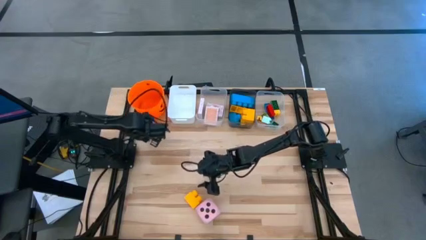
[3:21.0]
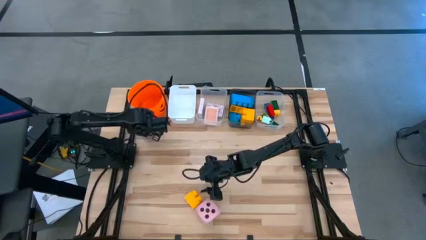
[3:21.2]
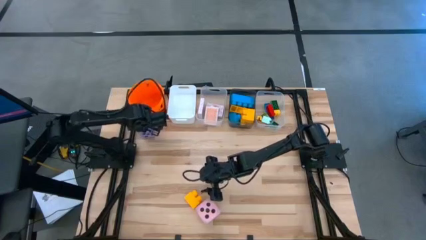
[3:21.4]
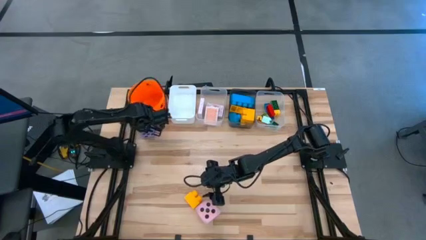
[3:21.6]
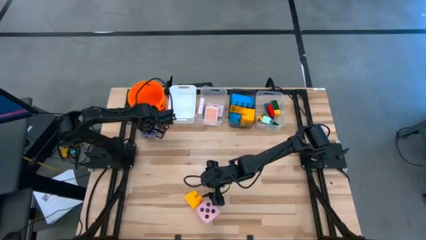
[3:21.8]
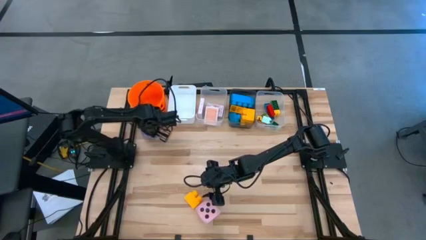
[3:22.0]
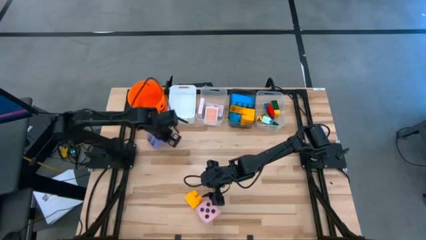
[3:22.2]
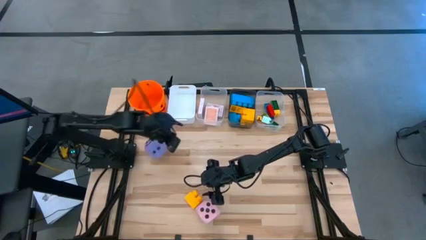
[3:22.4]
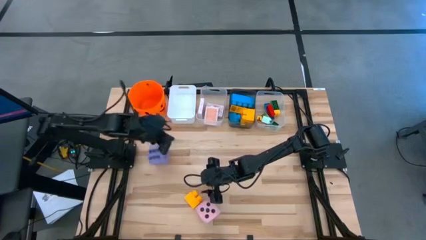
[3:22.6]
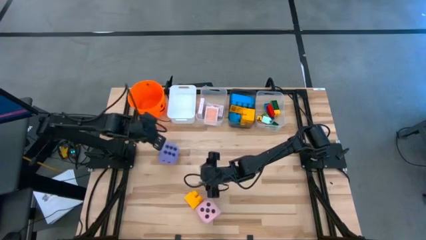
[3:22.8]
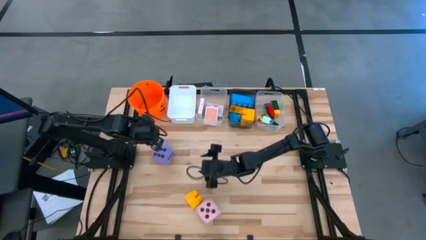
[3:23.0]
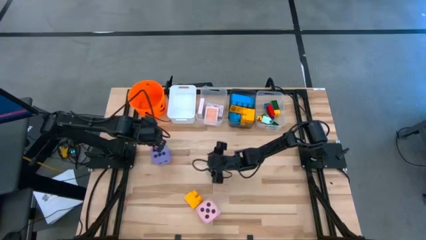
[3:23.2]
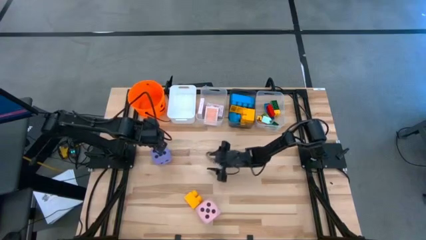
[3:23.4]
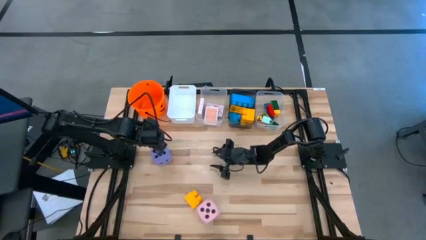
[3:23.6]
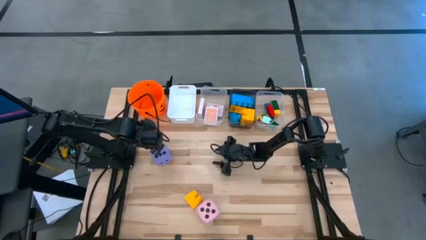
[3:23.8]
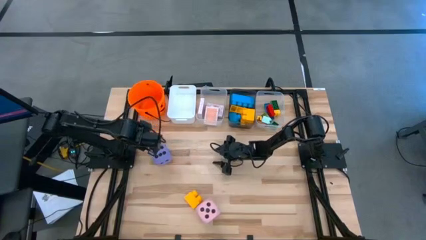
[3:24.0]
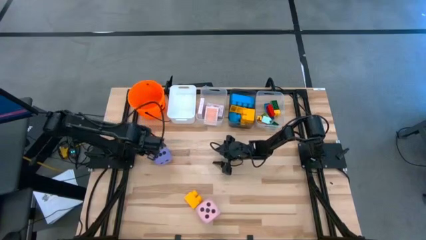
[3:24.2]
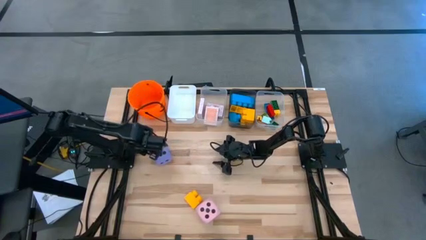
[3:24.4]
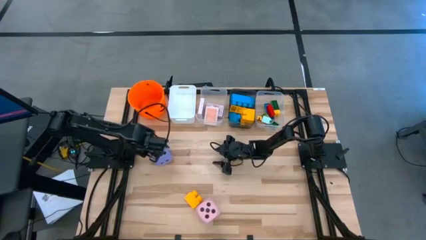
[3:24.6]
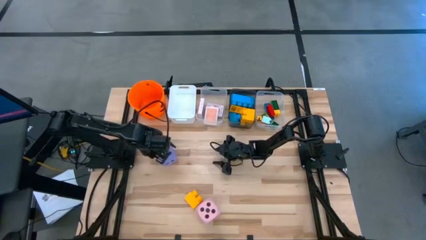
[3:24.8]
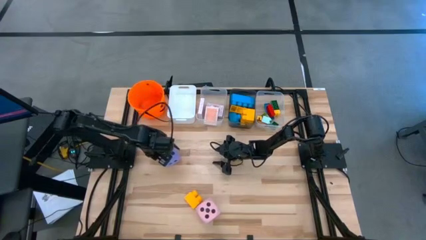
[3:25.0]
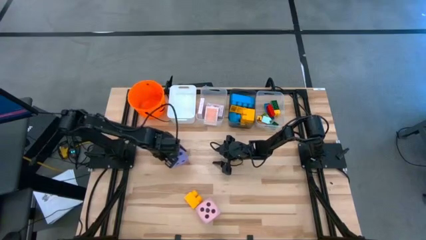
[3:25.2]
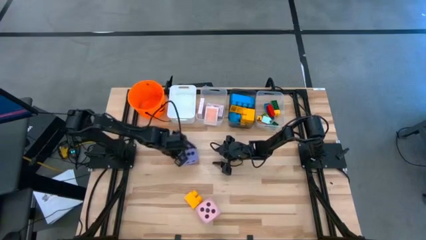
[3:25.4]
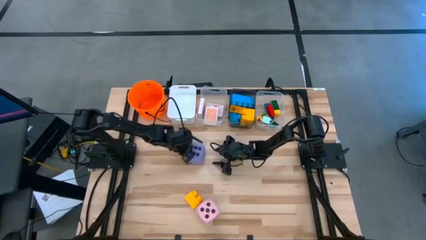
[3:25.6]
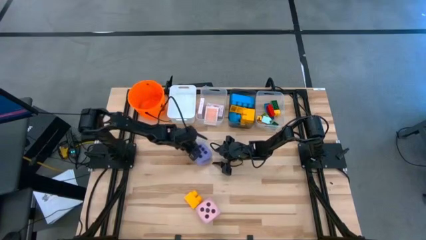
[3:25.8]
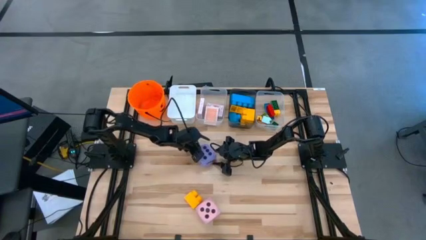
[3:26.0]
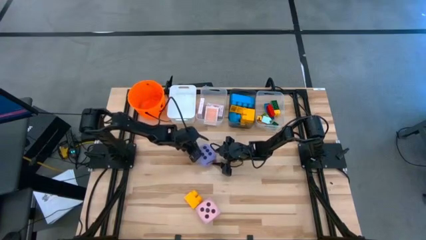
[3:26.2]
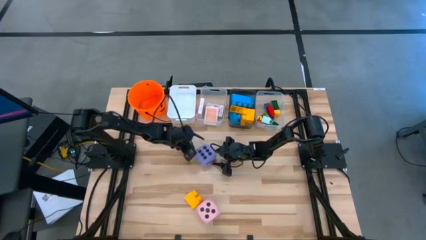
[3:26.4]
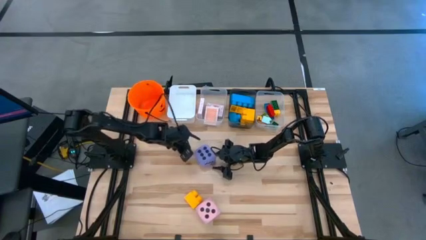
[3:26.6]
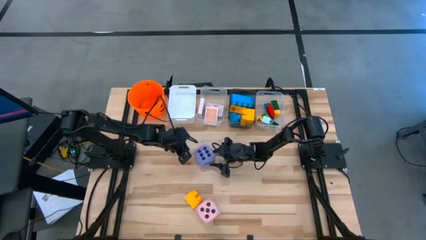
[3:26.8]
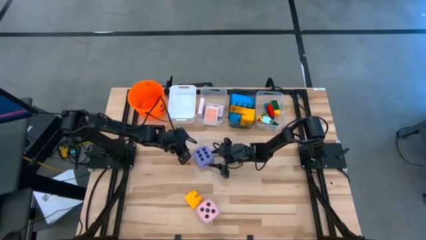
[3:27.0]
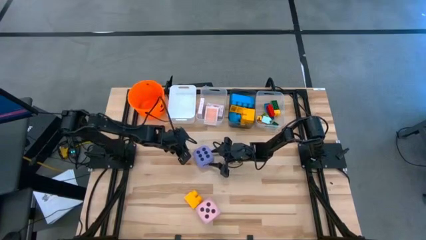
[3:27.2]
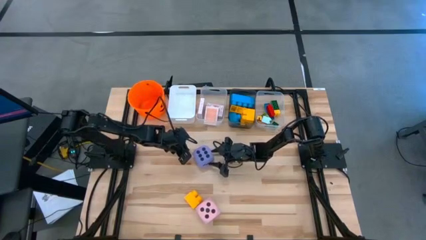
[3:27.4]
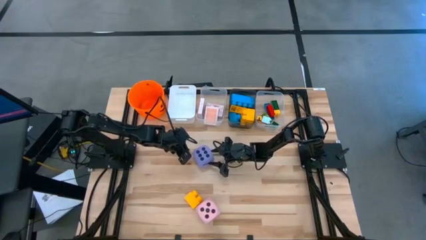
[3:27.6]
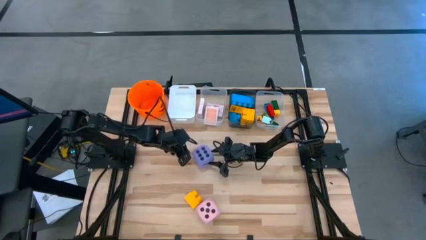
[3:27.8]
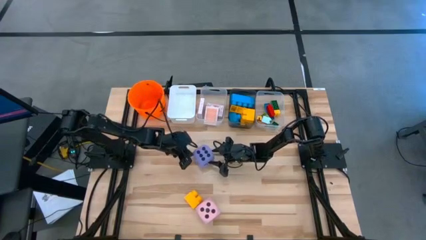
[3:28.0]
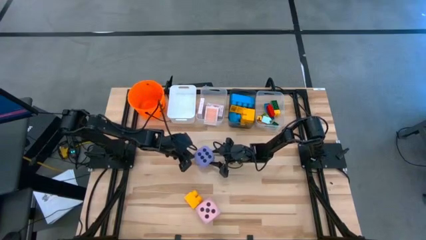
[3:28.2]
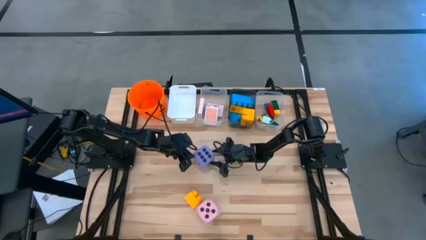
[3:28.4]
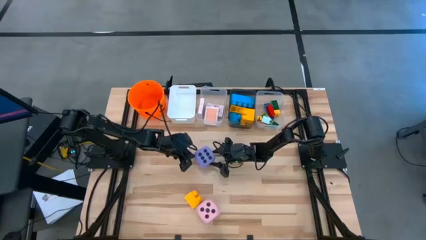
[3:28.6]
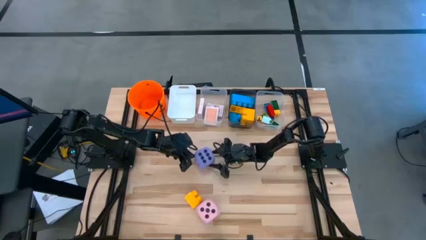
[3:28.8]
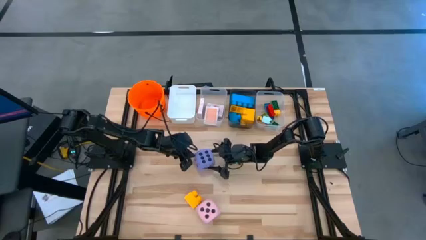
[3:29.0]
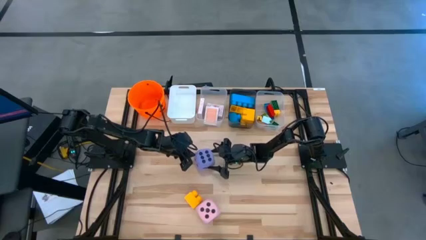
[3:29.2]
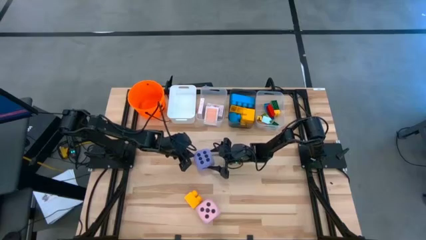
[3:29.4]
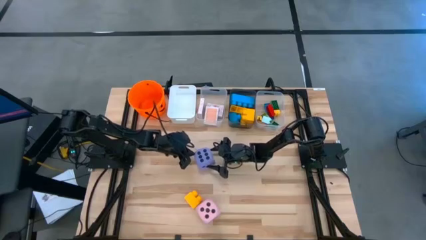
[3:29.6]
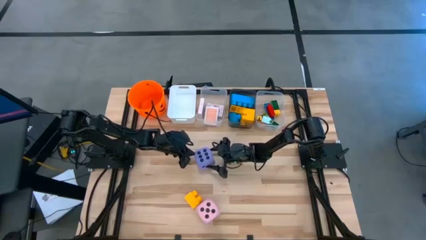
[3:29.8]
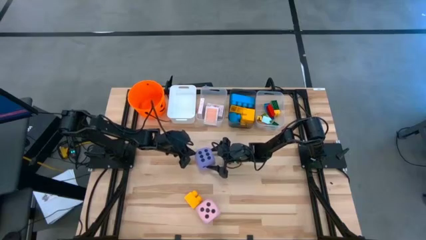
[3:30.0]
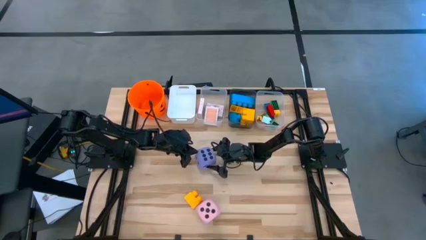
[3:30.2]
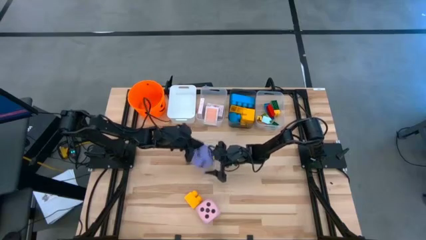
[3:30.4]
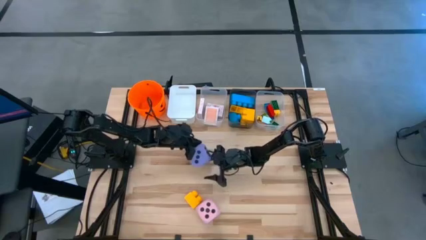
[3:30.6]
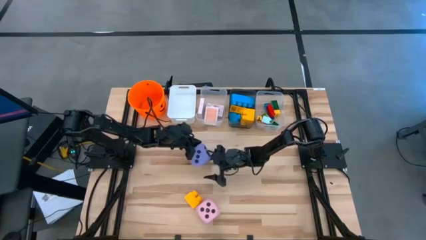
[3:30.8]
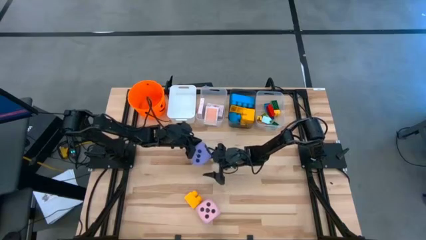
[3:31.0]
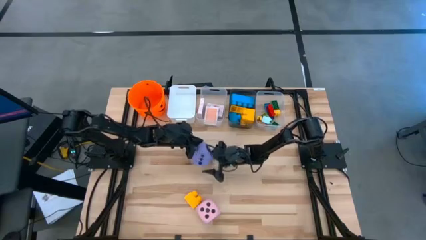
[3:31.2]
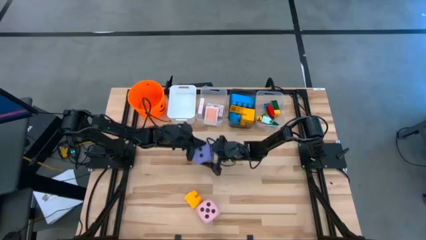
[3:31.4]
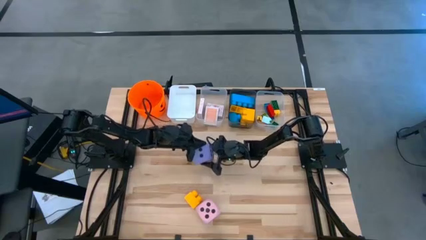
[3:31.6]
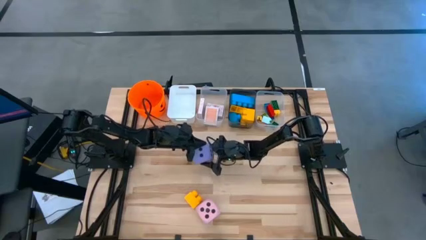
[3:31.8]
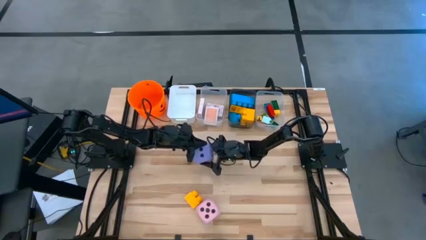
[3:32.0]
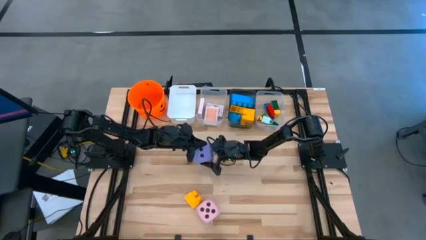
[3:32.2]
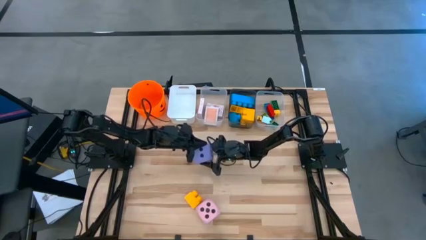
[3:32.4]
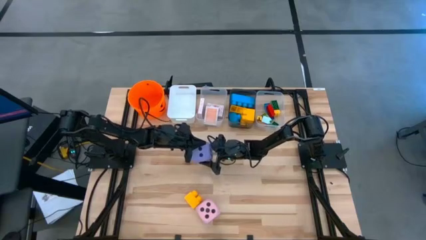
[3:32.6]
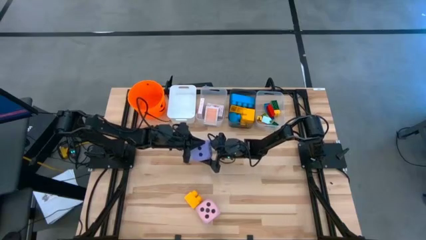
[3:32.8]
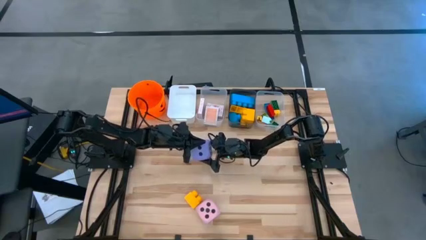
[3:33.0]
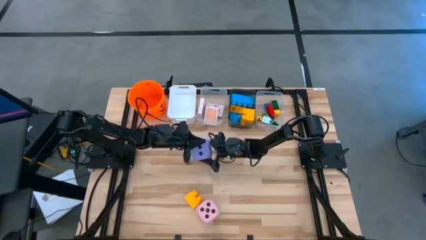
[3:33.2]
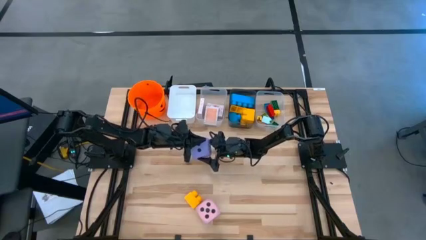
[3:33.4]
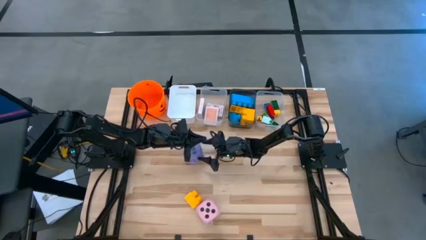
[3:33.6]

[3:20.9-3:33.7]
Task: Pick & Place Toys
Put the purple die into the white bin

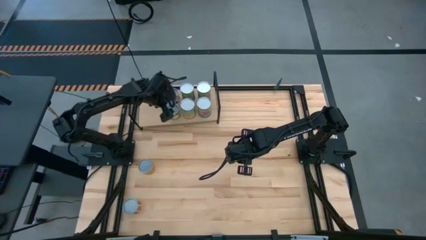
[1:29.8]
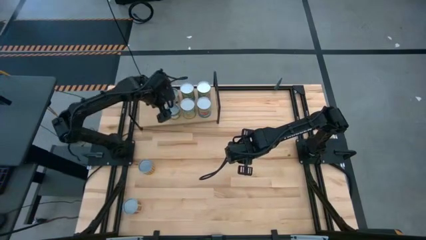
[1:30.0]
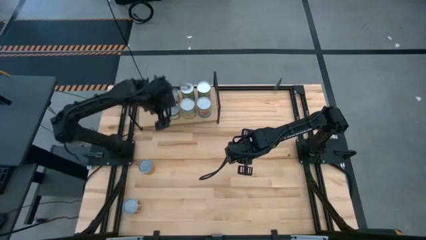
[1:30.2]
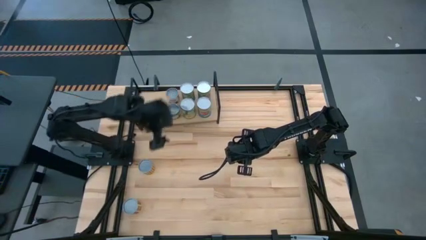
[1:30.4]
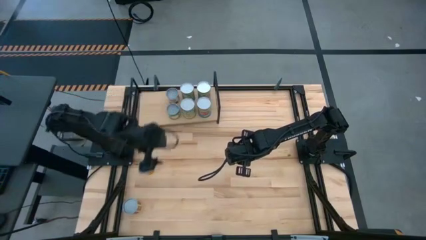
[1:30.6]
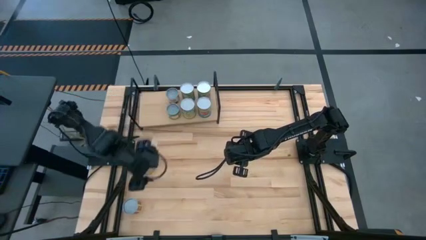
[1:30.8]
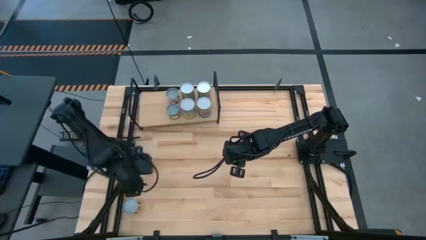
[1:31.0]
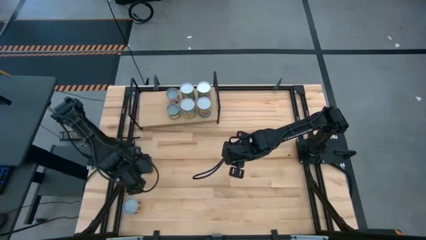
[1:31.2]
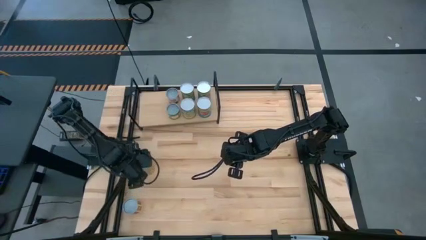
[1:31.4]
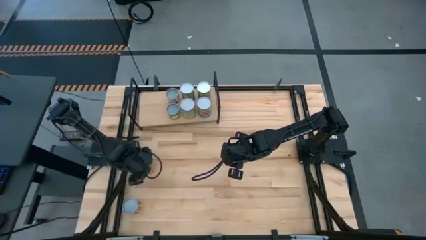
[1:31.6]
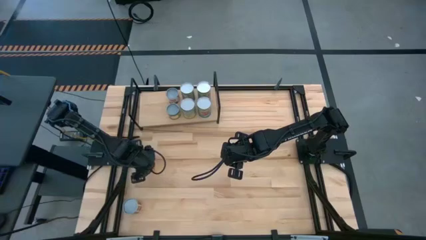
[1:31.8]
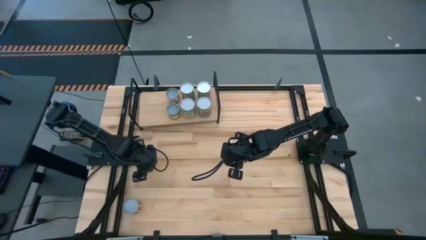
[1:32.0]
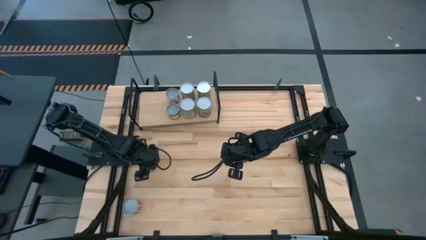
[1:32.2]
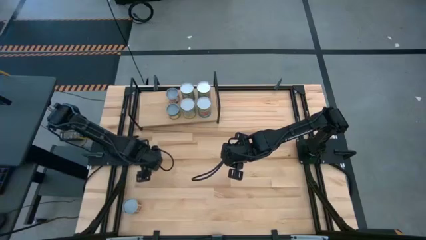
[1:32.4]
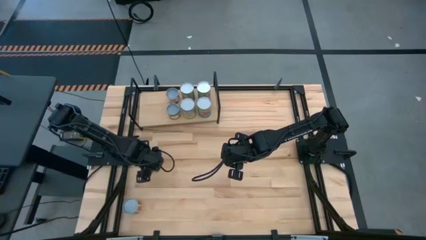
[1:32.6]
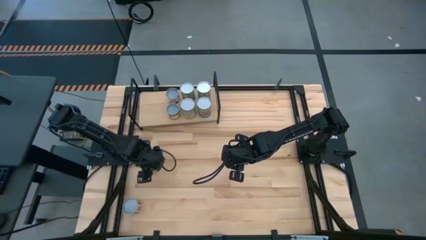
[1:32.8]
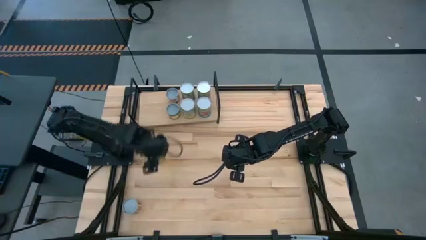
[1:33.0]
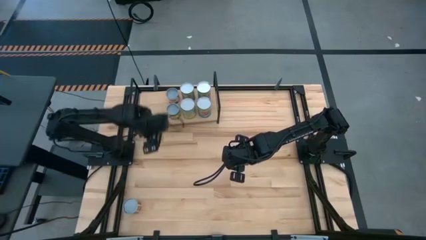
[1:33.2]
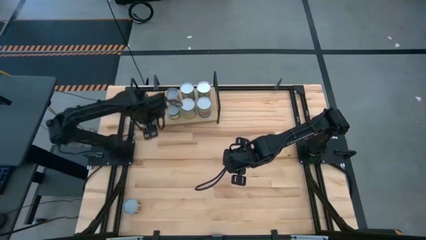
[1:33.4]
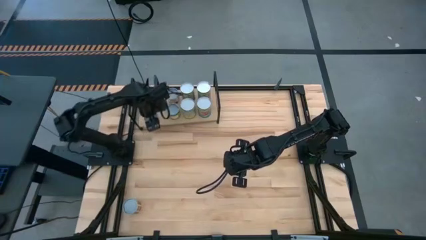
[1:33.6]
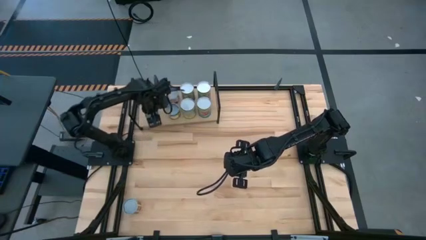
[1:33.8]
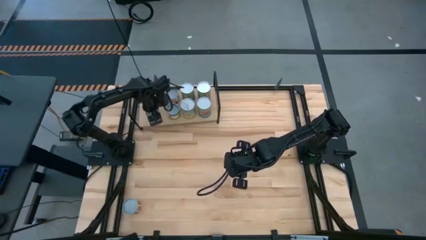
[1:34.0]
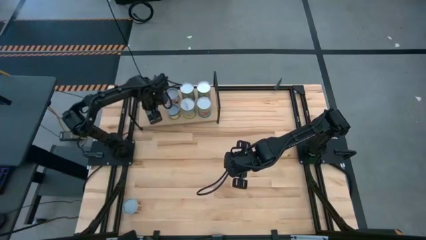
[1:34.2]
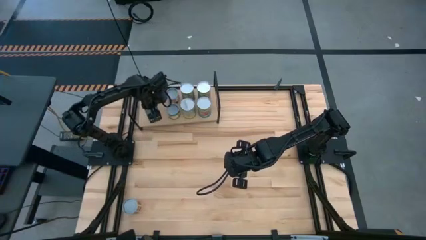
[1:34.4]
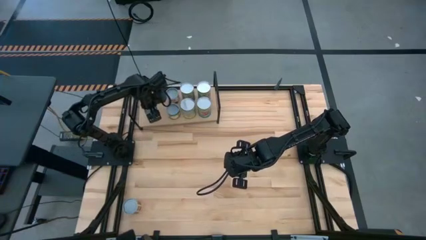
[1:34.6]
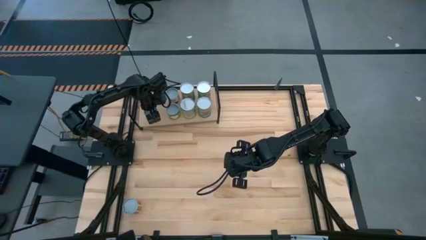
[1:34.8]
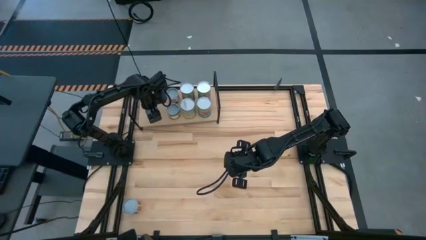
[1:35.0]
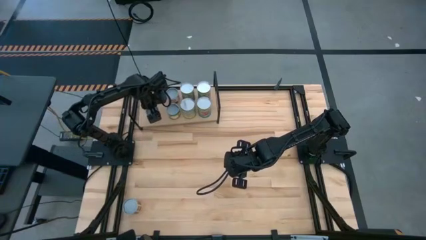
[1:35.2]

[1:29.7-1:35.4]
Task: Pick and place cans onto a shelf
Put the canned beans on the shelf
